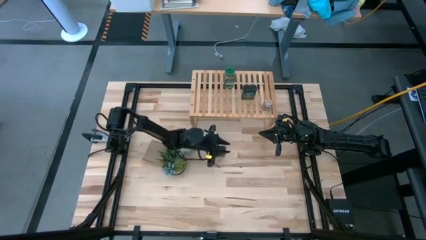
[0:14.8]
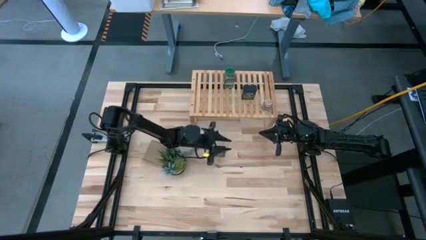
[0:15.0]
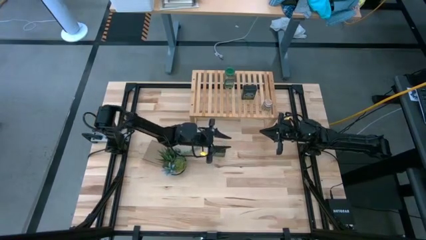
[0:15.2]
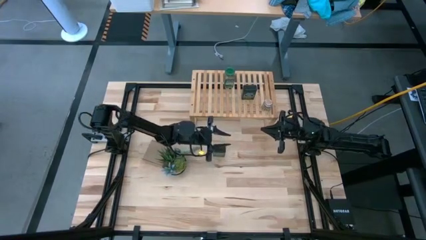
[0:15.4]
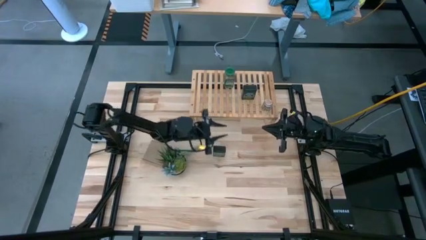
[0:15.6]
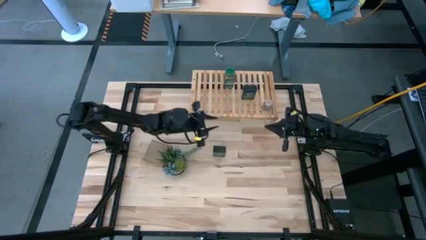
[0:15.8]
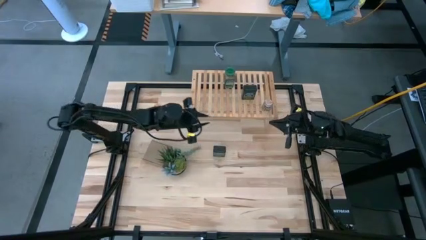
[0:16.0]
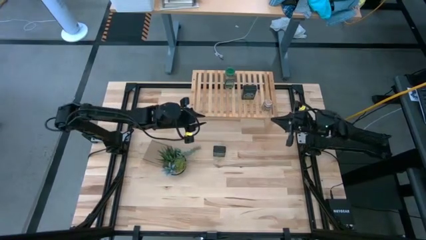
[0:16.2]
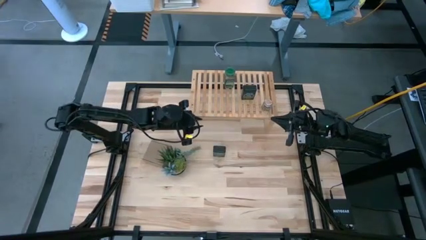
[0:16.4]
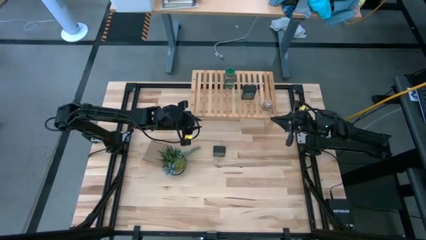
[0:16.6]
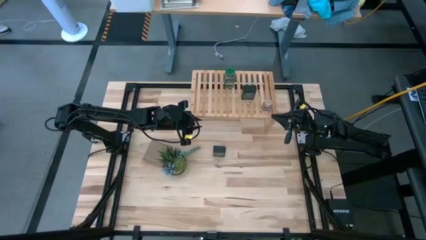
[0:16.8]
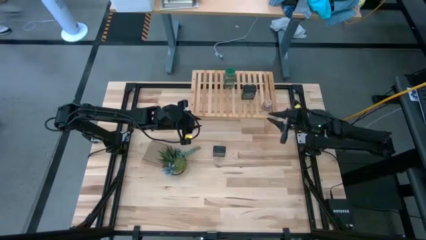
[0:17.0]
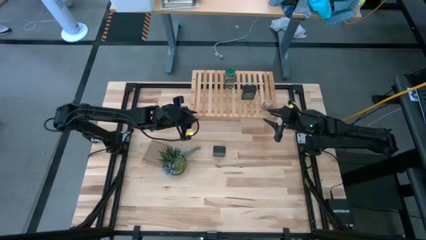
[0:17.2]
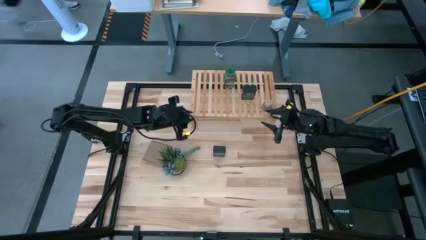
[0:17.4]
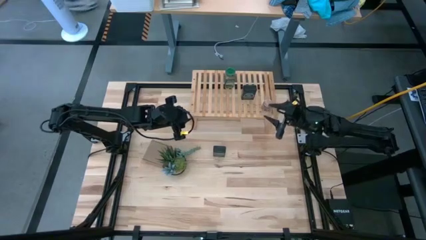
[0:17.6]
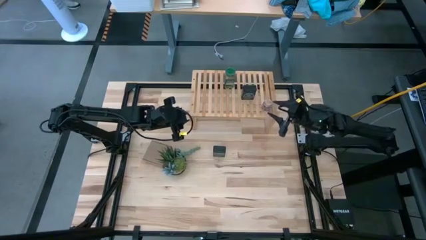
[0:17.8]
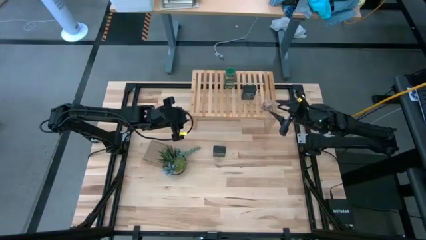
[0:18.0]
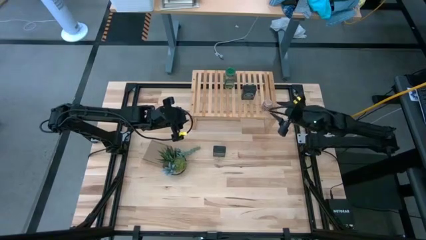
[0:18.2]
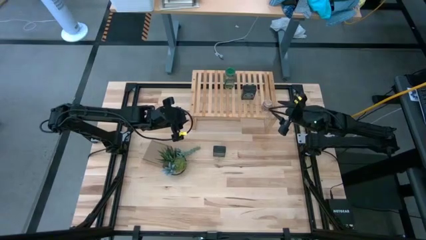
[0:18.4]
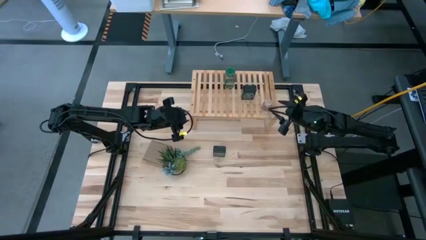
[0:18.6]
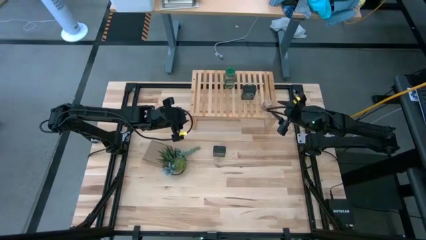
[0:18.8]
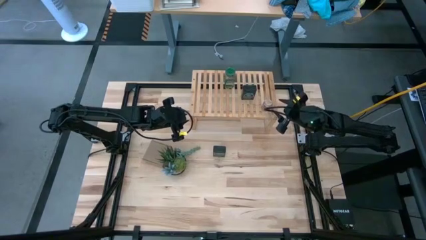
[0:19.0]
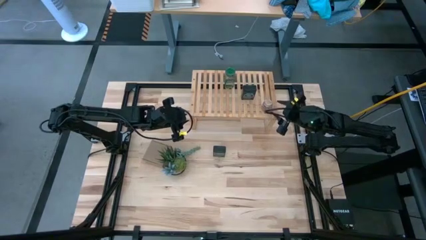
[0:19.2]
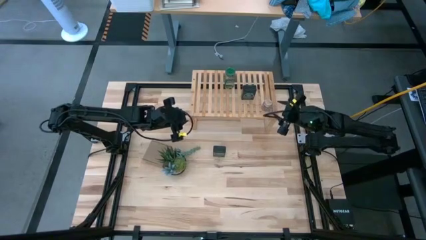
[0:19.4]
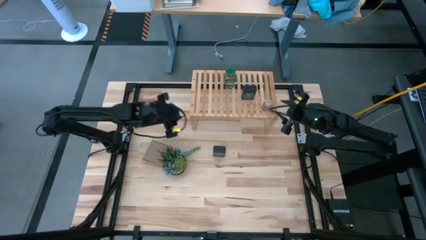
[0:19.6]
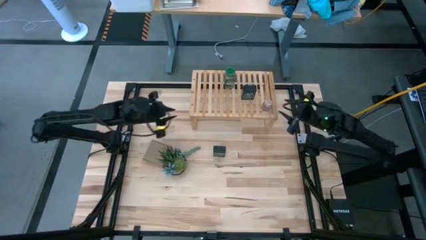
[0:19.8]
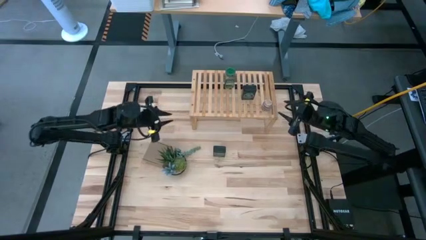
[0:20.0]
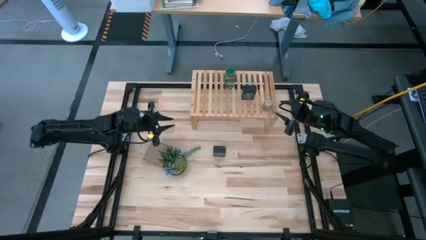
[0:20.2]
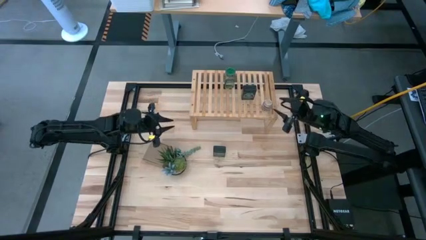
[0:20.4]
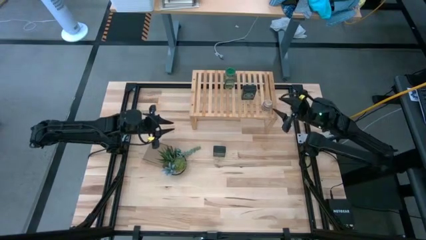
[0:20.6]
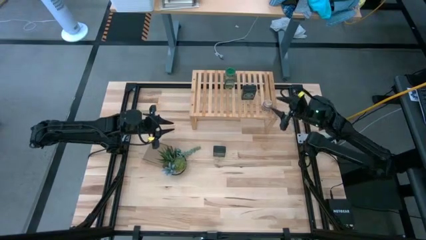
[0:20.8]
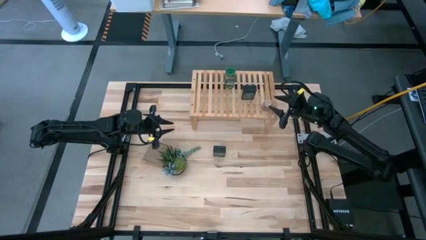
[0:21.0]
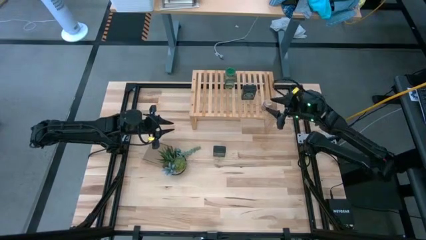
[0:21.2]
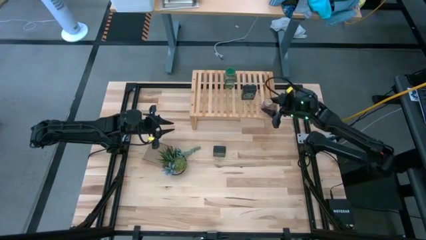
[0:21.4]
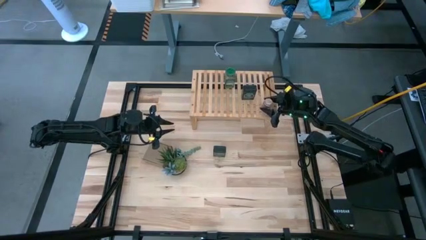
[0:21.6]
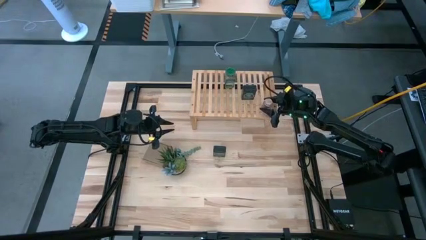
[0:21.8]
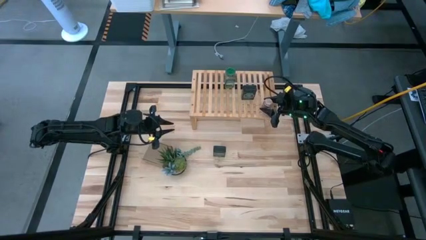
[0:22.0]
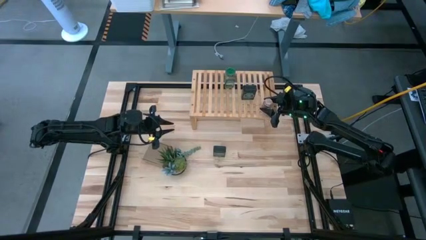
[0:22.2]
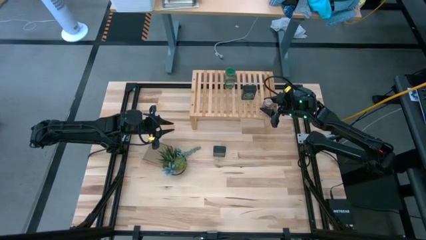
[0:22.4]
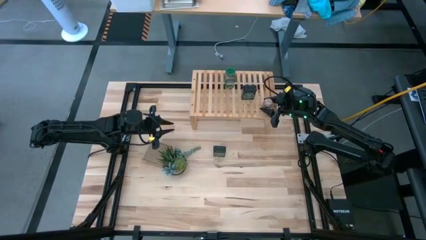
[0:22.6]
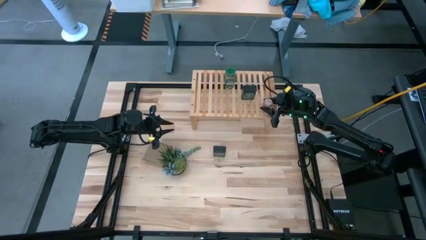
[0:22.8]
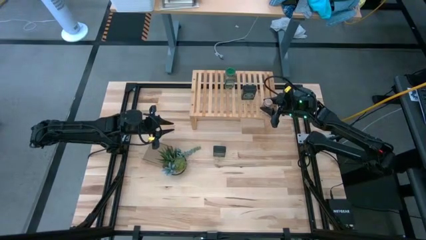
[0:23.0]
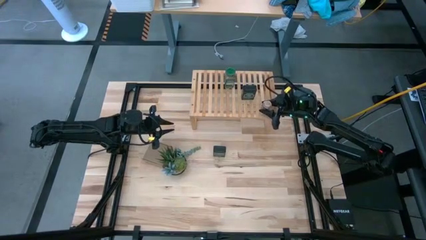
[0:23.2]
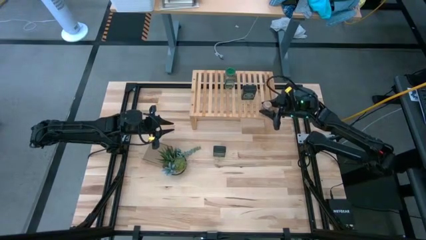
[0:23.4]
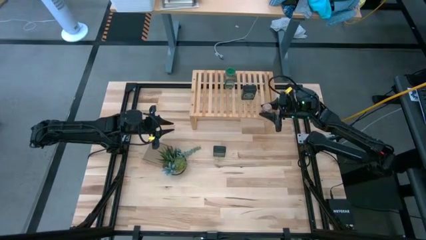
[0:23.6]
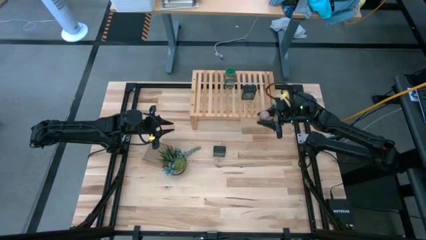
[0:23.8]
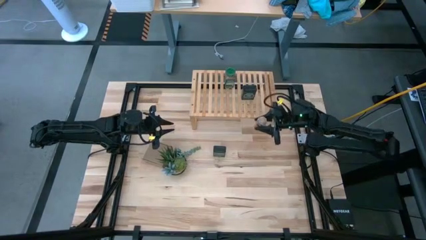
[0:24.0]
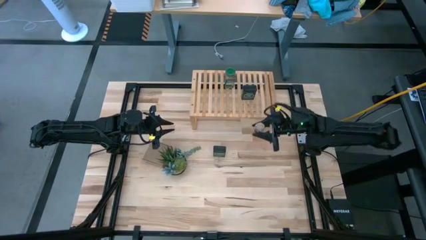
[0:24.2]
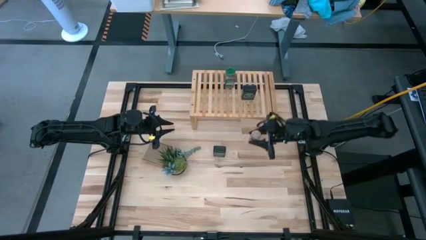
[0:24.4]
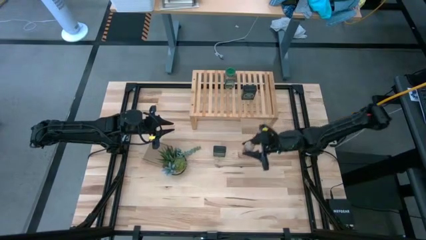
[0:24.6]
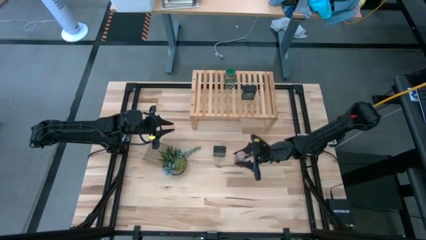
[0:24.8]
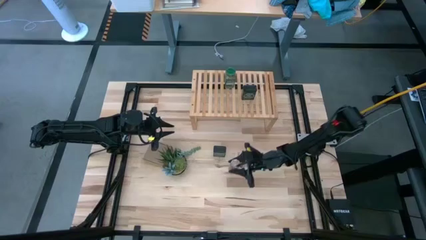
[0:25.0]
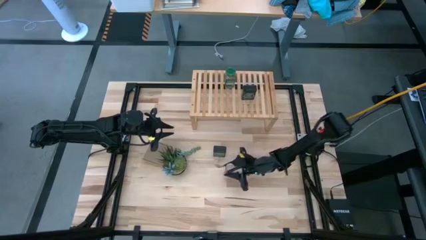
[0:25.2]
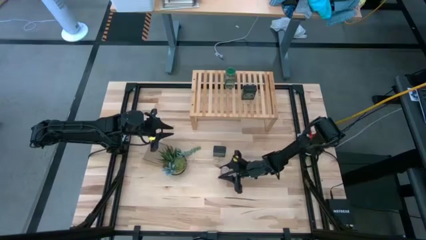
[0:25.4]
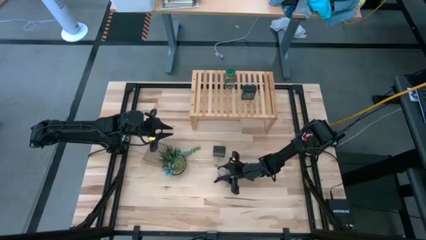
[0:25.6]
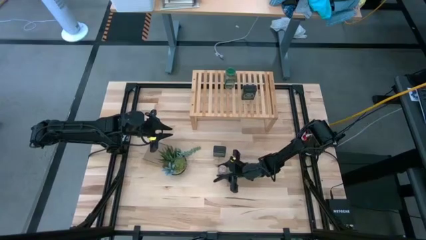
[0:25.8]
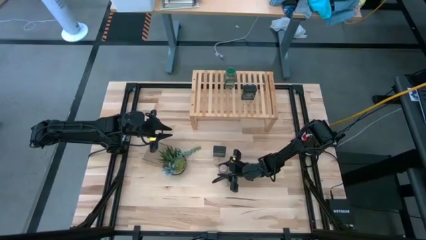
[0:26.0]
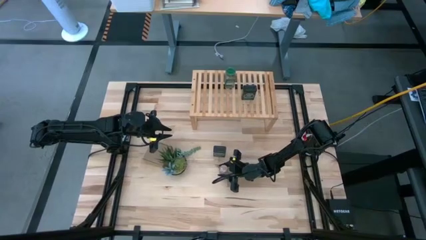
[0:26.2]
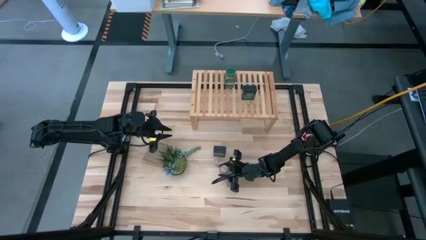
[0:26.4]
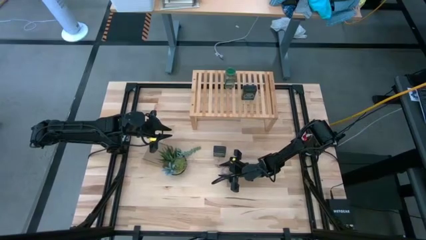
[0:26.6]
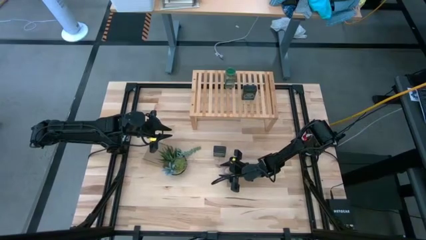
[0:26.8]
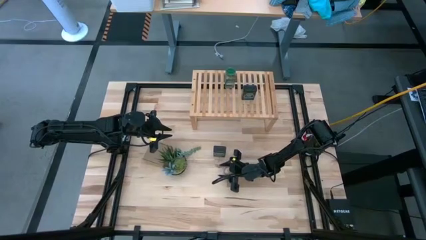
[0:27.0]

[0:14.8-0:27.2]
Task: Shelf spices
Remove the brown seasoning bottle from the shelf

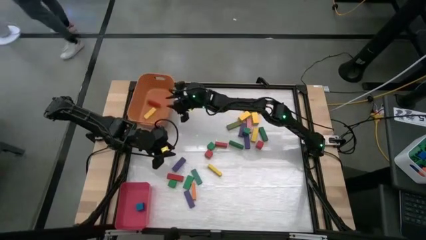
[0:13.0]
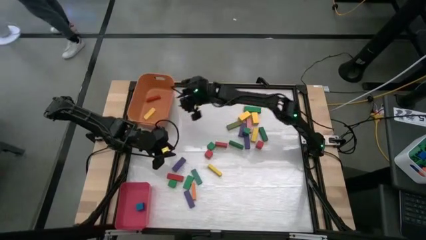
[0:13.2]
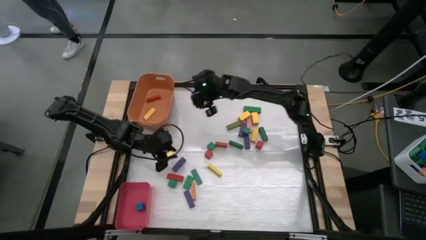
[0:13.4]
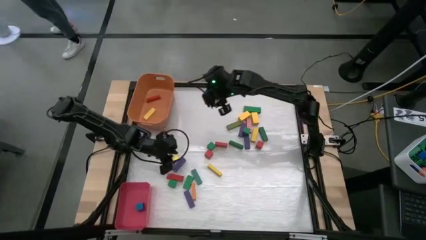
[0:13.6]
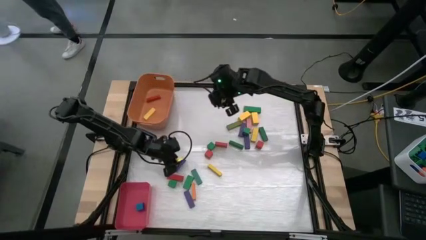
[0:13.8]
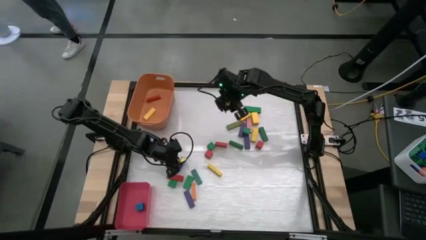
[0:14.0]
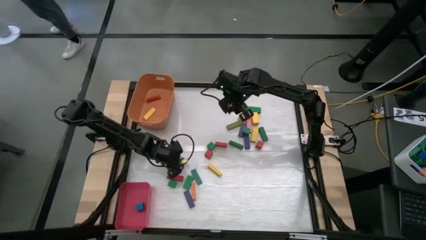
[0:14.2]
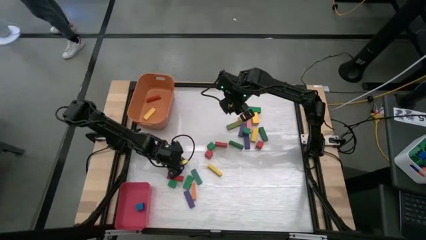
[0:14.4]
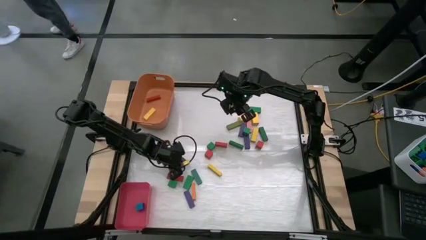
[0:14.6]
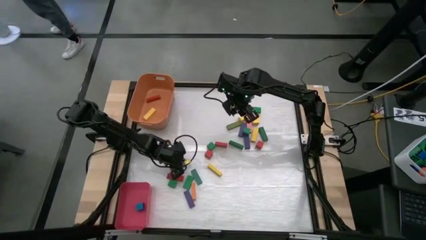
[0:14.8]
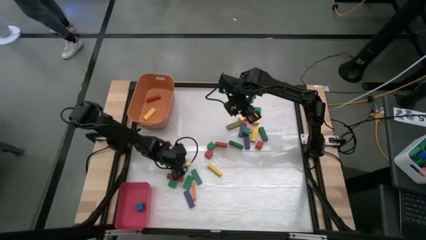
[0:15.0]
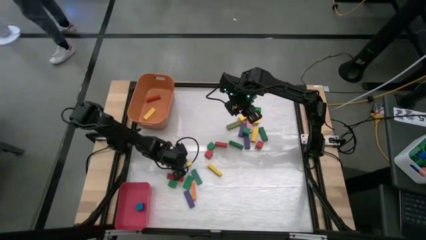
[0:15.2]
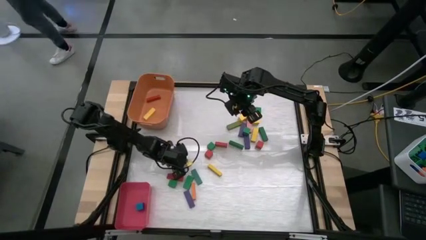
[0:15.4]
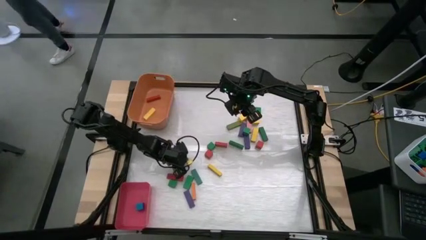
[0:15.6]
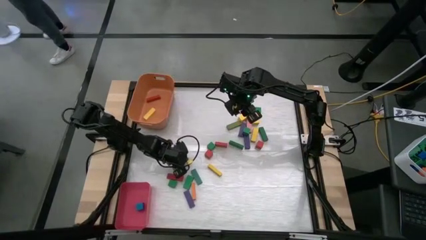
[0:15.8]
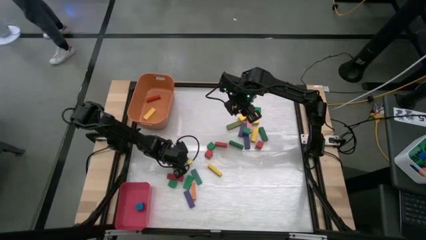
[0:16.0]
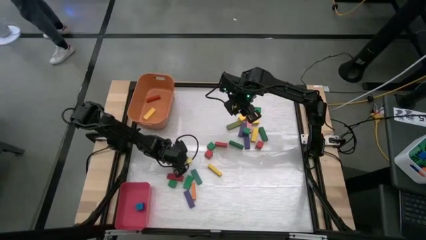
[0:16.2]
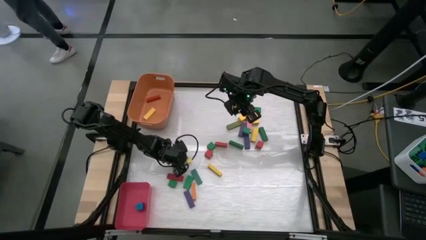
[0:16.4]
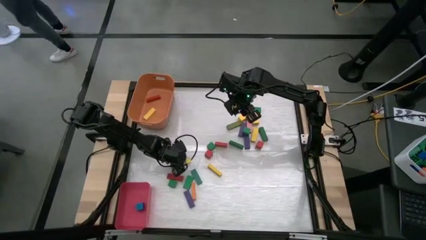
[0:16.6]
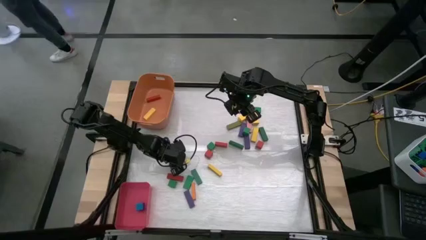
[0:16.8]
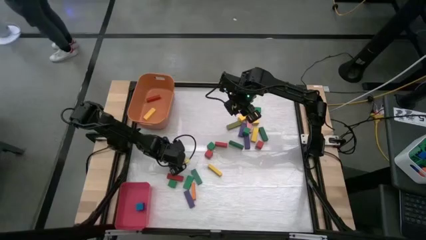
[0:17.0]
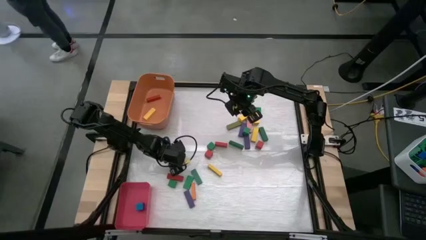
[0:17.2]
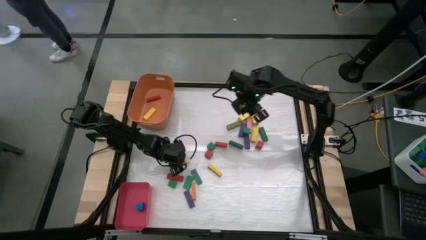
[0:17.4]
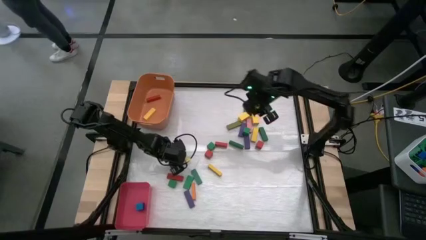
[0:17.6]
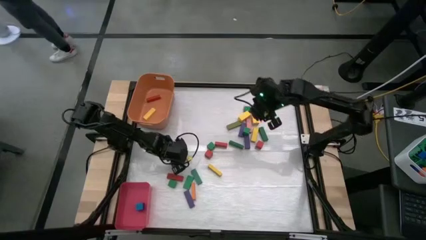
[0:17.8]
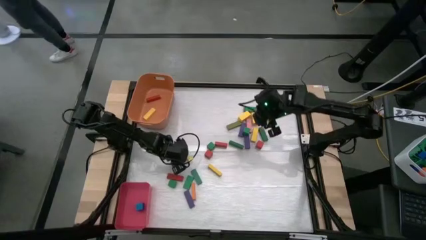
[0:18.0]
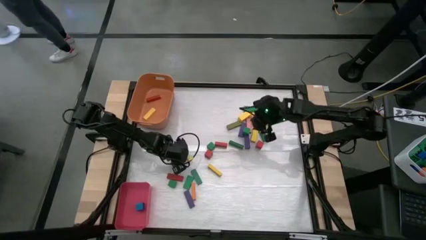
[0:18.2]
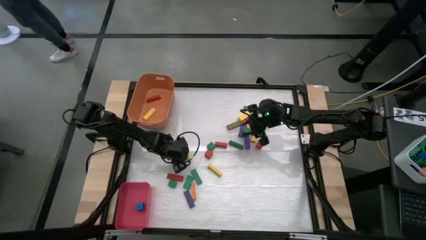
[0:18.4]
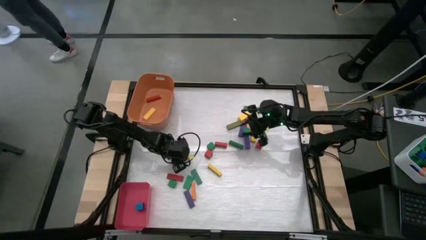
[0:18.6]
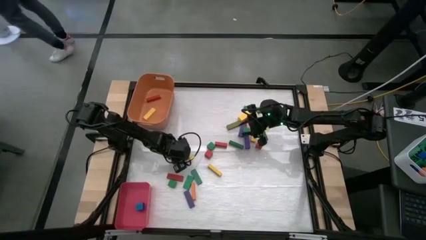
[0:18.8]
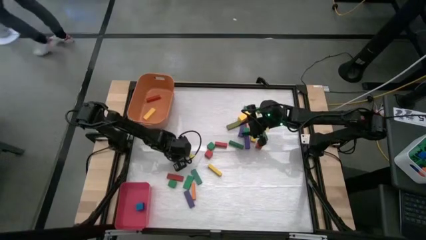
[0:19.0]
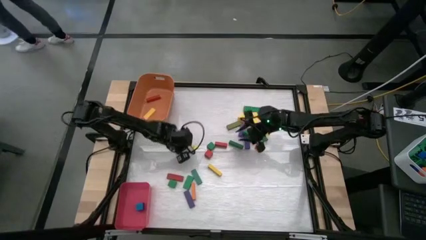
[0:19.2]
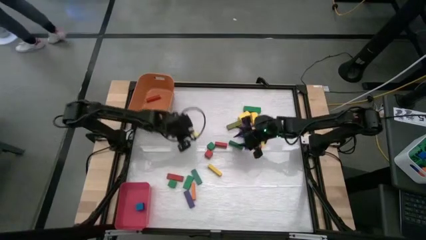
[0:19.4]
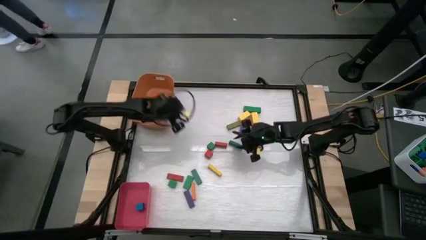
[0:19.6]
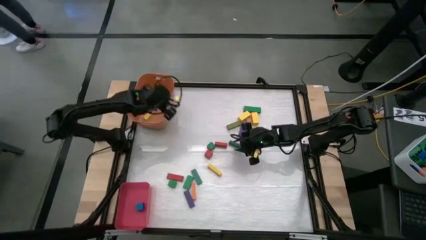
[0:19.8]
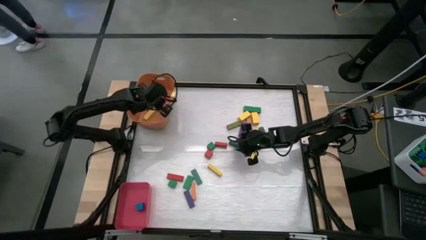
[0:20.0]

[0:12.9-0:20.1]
Task: Sort blocks by size
Put the big purple block into the orange bin
